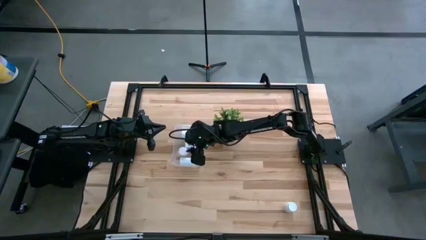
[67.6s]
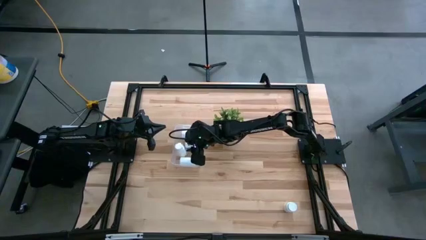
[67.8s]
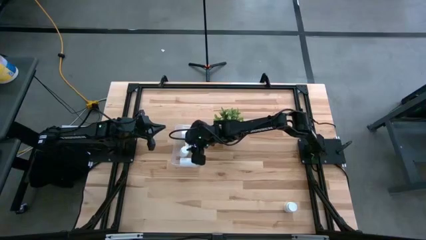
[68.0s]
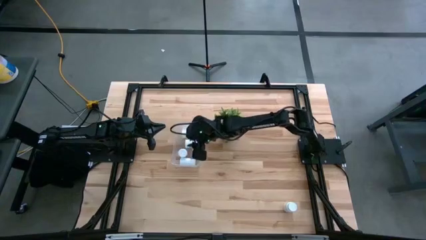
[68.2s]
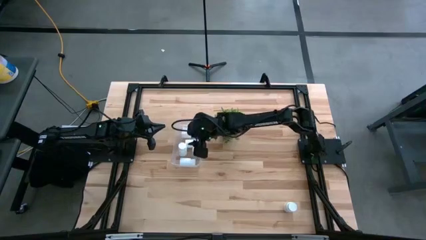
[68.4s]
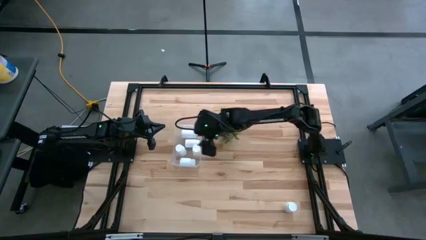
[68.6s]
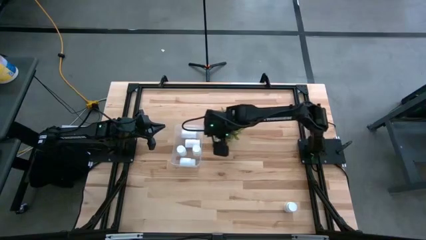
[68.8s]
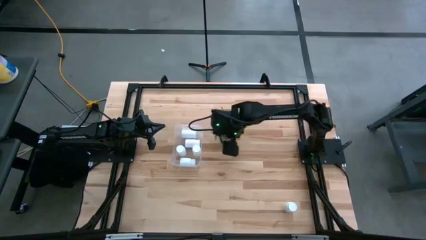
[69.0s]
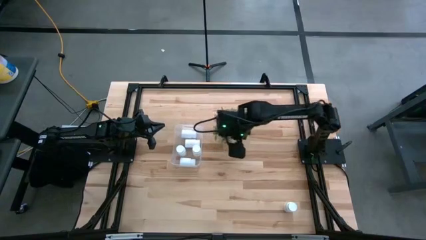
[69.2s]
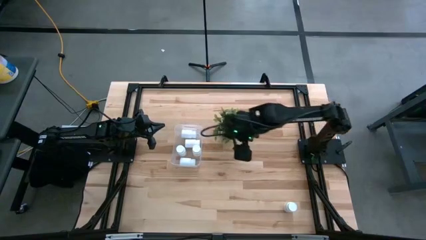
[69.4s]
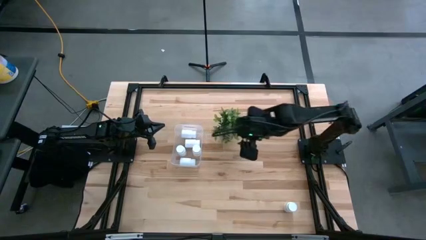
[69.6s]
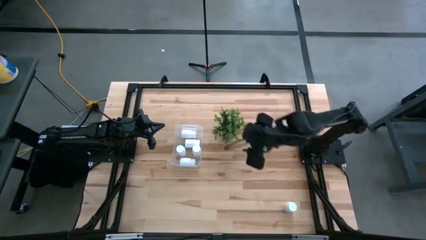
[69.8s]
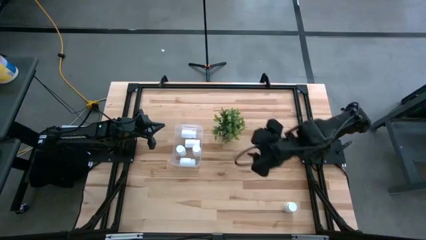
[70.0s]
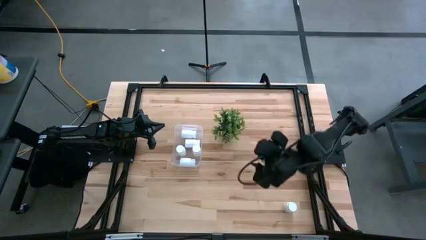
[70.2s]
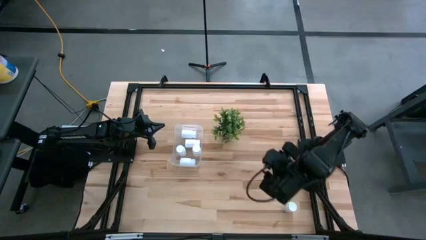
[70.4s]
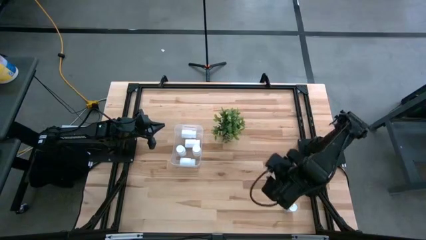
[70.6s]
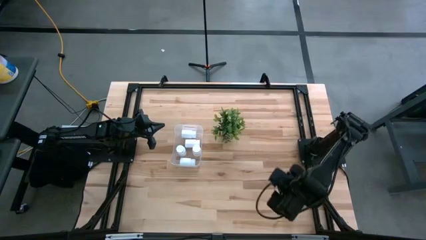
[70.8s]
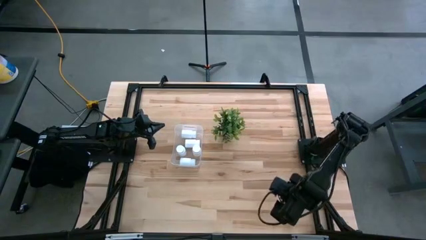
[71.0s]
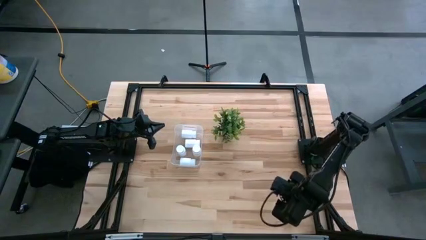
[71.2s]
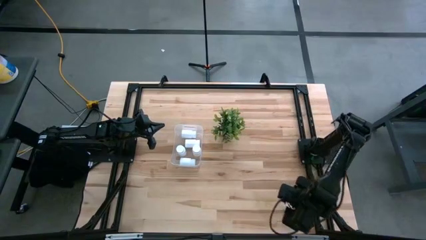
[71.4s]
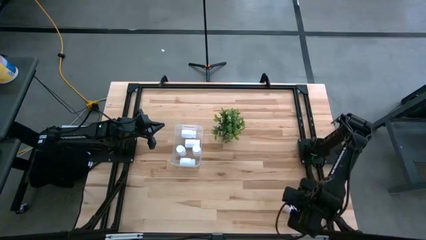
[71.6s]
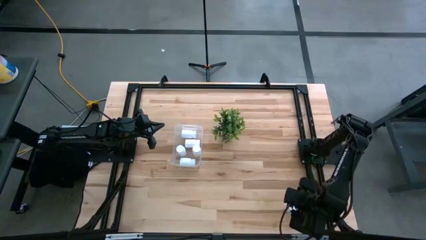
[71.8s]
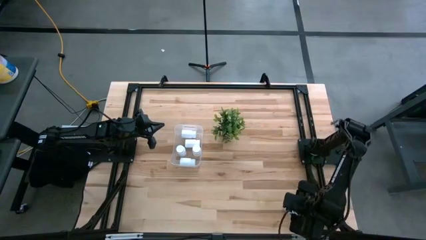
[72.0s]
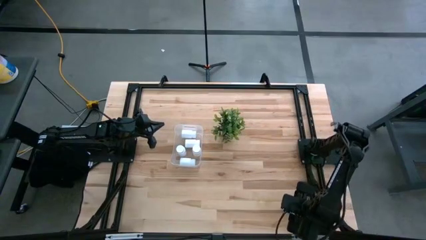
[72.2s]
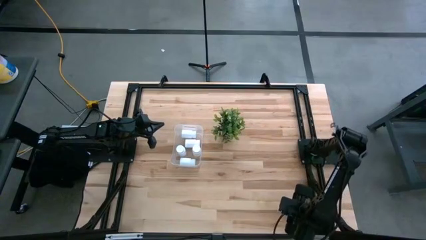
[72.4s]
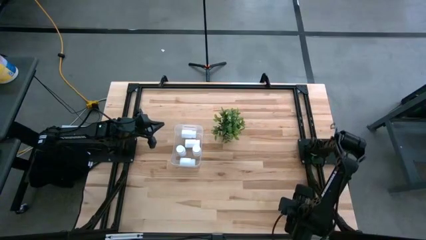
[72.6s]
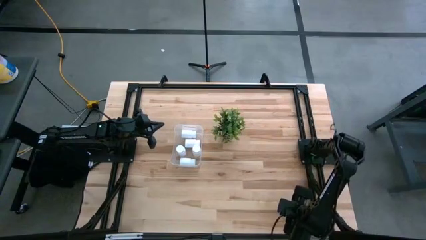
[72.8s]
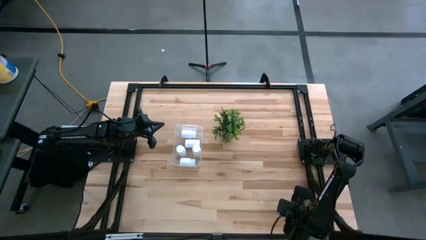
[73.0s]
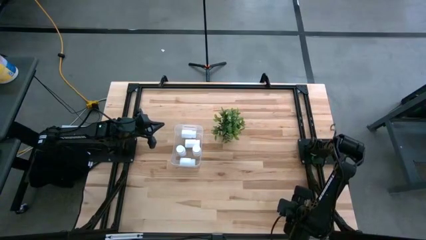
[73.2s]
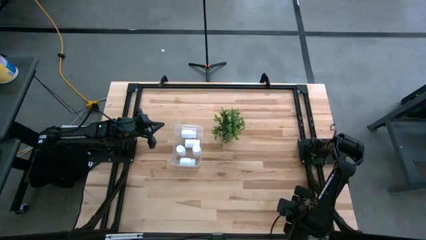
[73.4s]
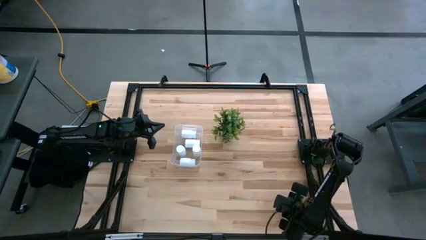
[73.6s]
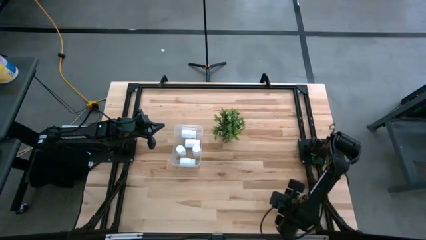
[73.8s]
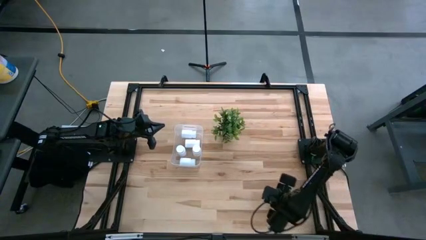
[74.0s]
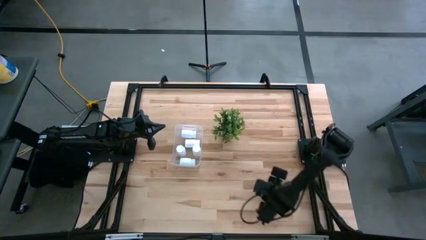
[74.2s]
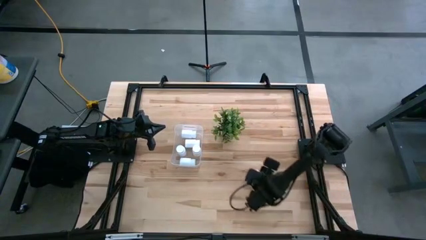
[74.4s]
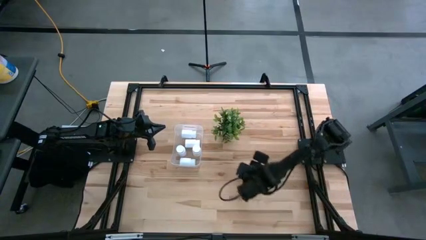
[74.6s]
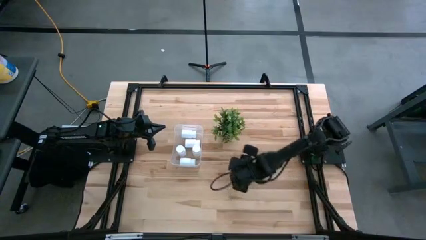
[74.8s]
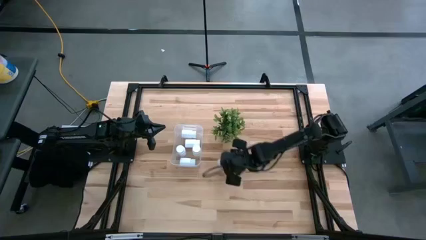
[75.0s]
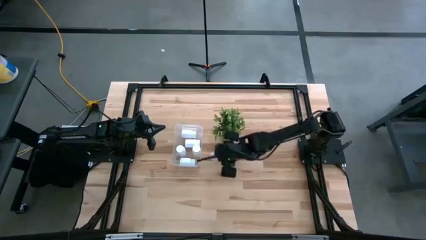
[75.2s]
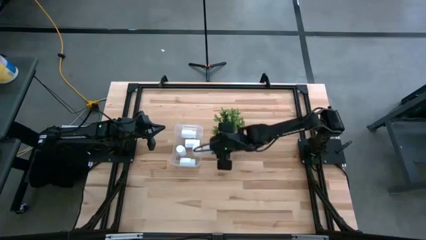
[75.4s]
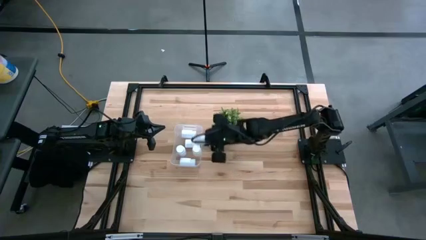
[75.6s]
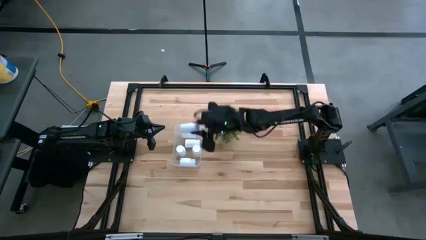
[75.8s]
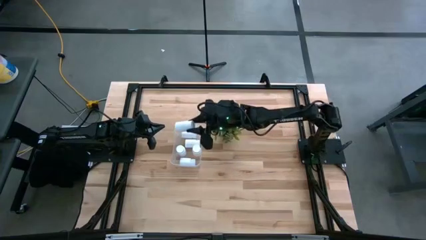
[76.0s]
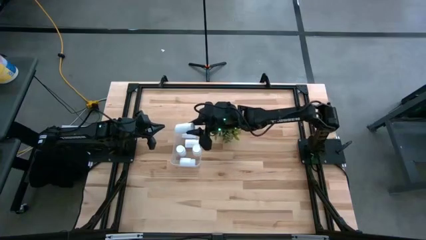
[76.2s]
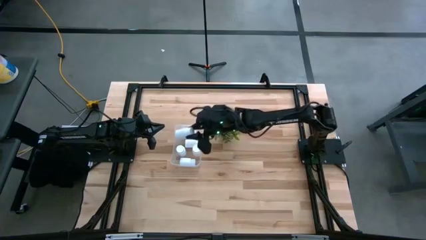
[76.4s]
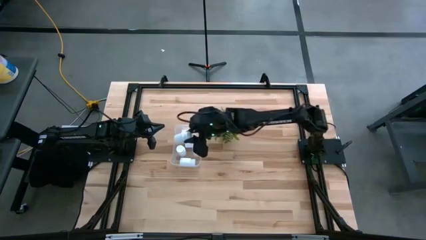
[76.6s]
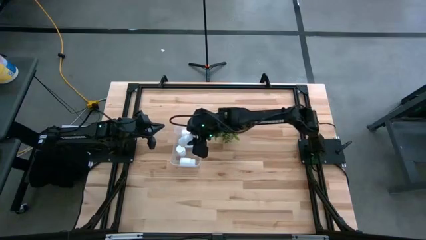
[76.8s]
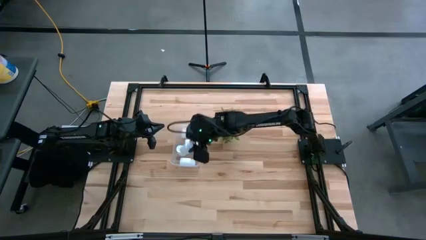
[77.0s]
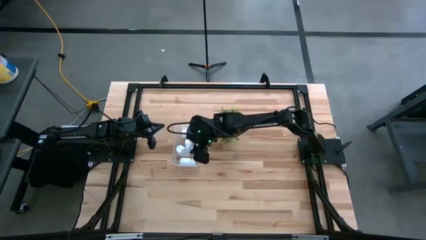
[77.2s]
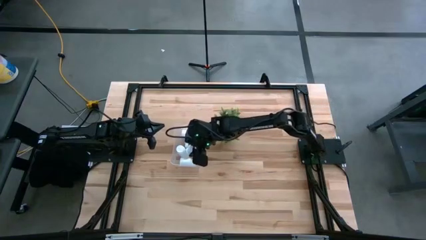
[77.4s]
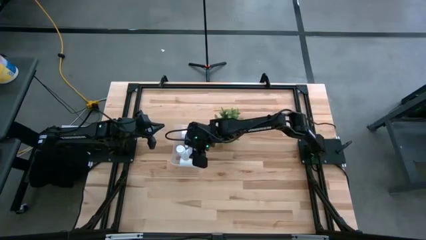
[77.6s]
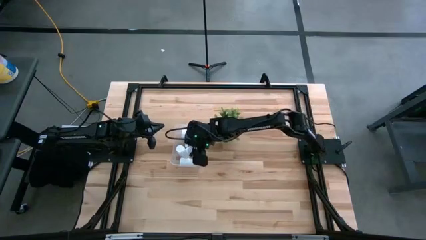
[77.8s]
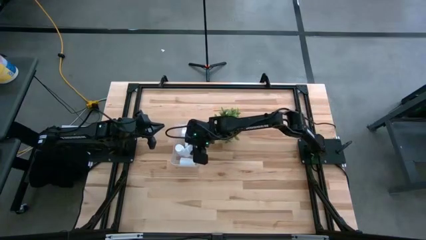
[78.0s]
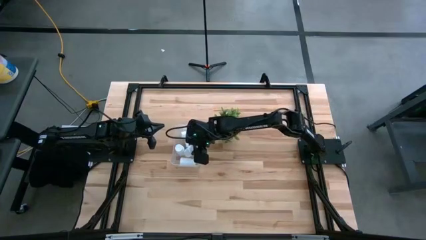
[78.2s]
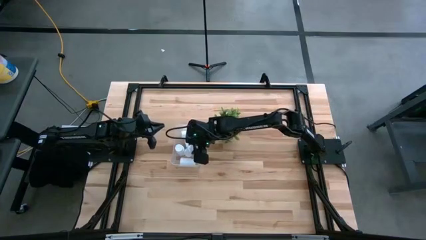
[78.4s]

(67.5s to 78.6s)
Task: Pick and place pill bottles into a basket
Put the white pill bottle into the transparent bin

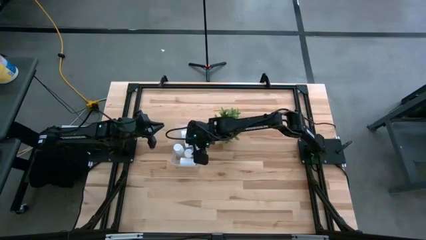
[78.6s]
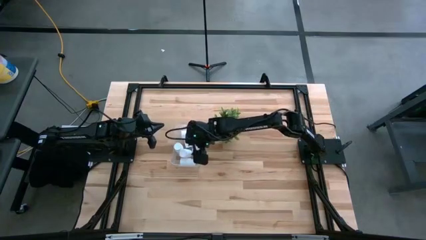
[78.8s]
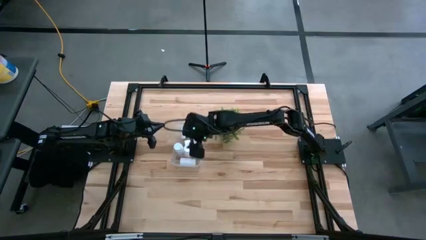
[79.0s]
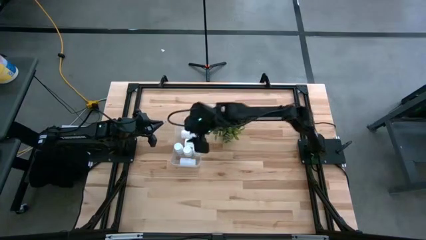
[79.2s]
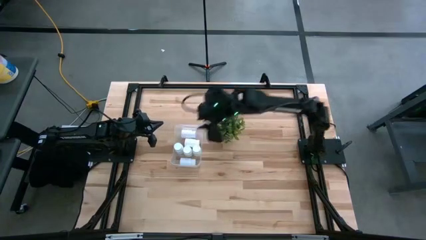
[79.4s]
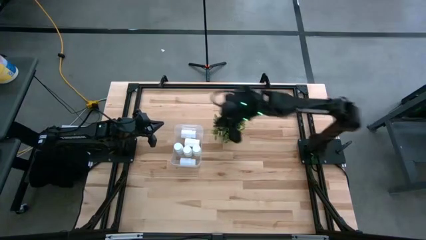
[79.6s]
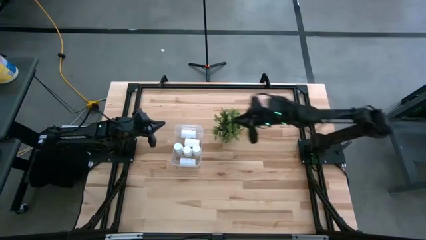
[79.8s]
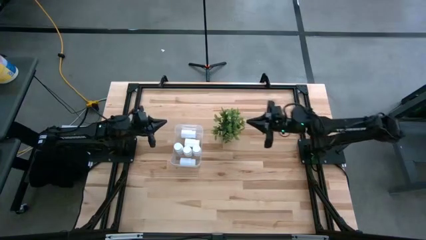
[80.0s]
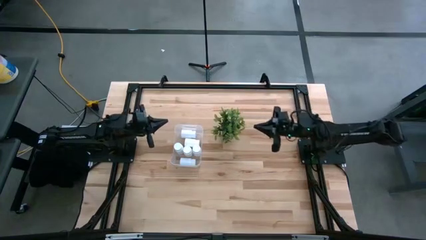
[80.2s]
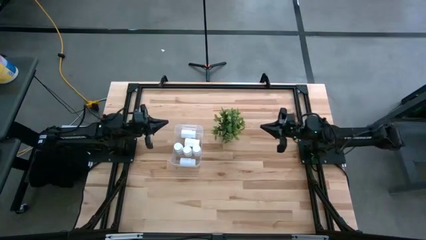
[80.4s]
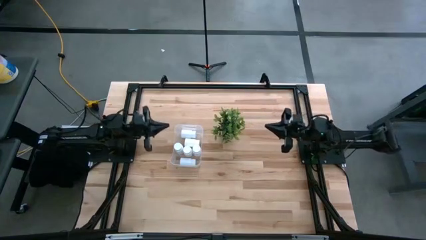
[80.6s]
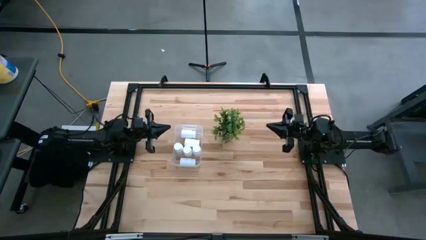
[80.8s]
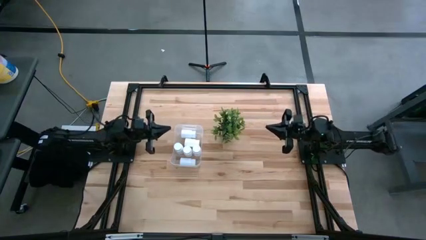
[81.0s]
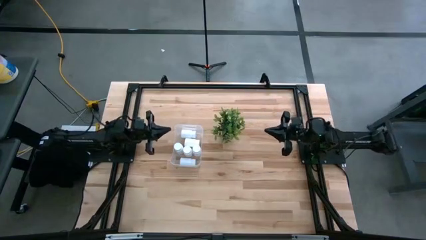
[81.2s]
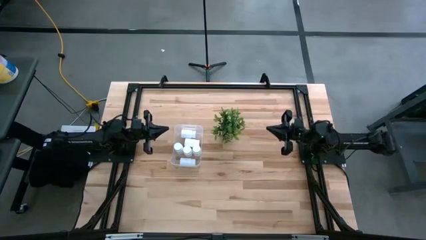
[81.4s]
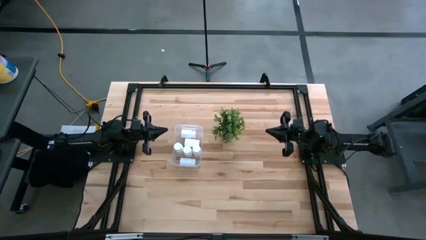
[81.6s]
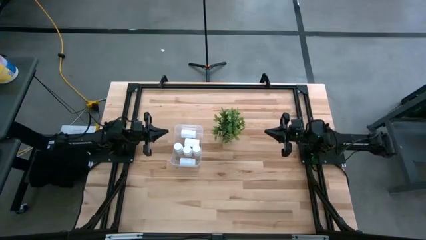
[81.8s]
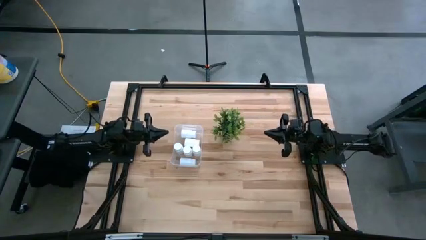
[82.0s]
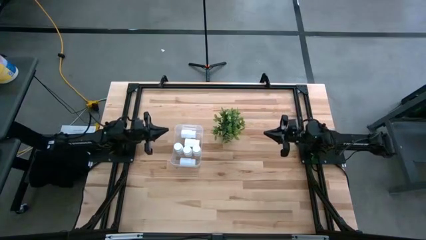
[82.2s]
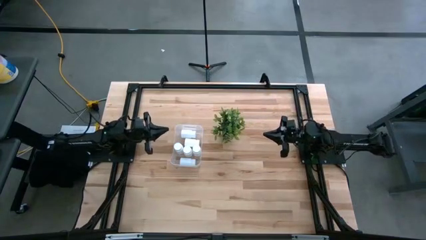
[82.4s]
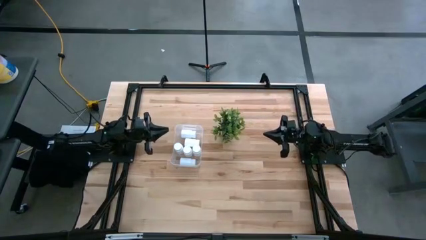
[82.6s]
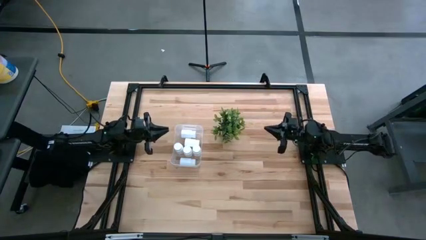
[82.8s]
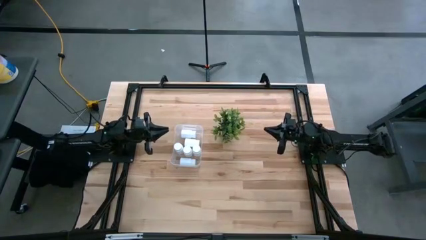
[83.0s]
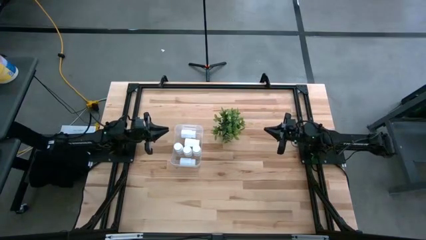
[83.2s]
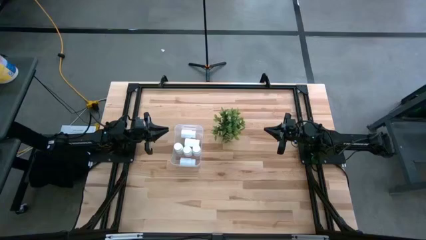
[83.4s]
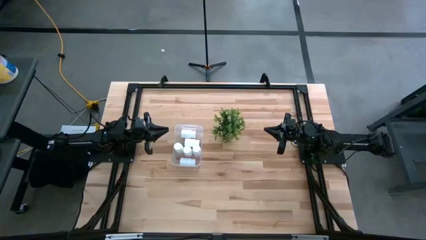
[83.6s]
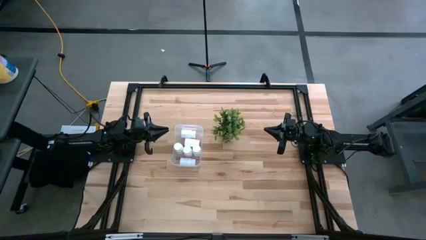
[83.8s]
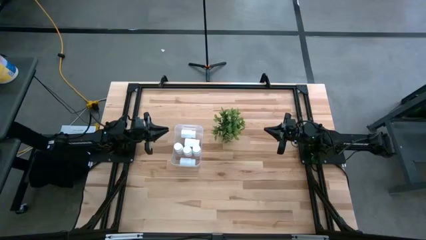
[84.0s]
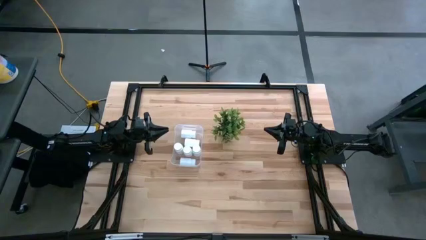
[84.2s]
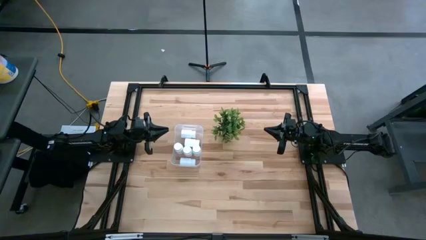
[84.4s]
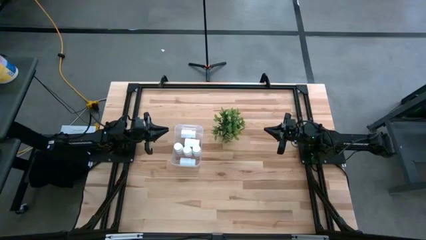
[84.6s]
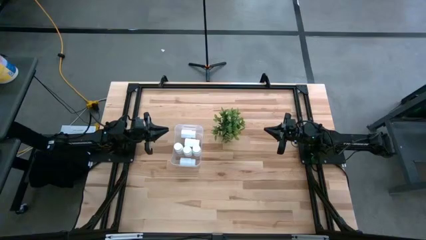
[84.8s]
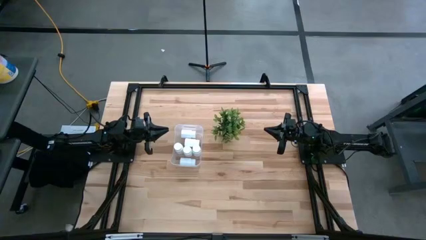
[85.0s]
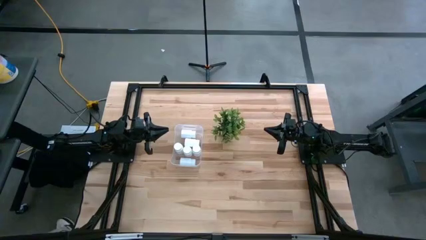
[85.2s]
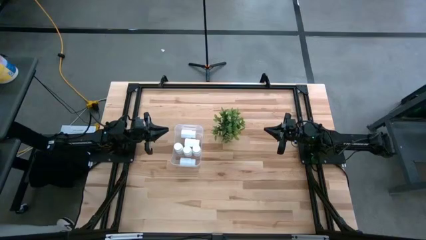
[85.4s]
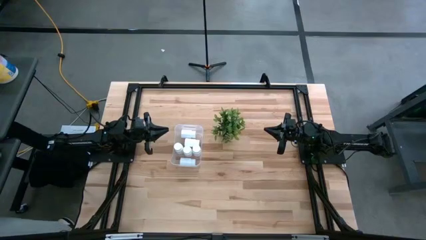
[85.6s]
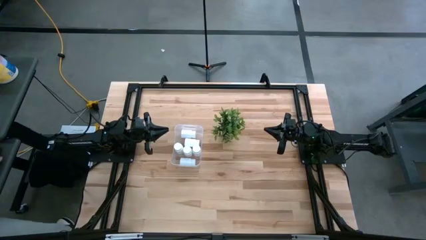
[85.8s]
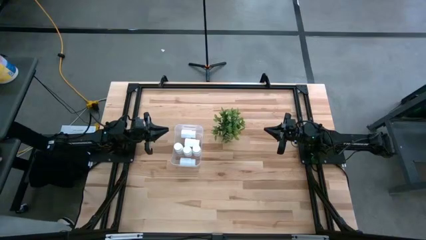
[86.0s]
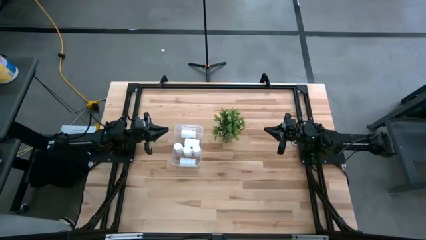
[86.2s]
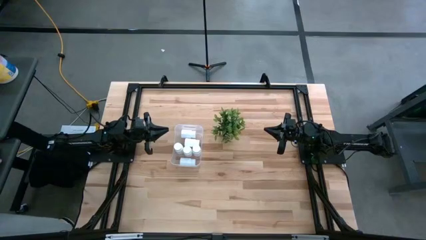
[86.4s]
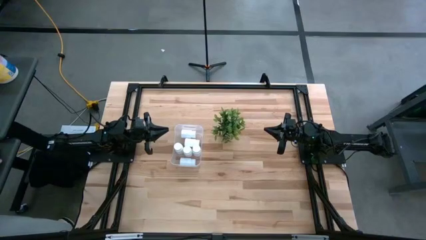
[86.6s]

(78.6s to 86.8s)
Return to Home Position
